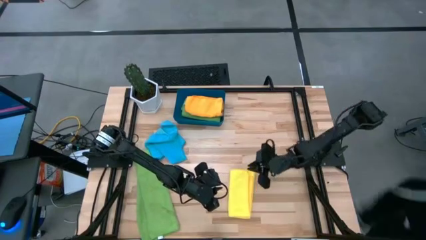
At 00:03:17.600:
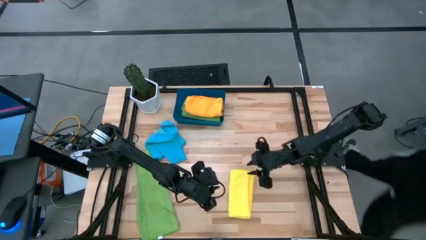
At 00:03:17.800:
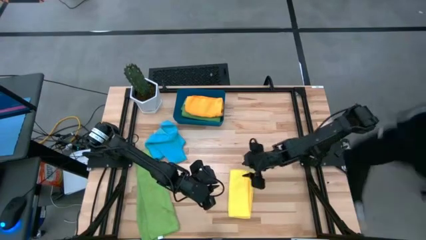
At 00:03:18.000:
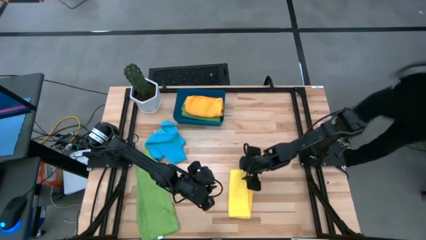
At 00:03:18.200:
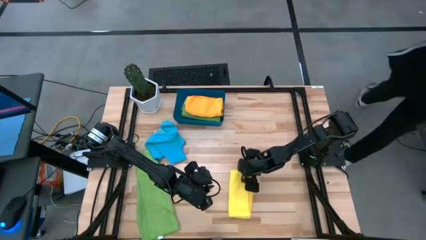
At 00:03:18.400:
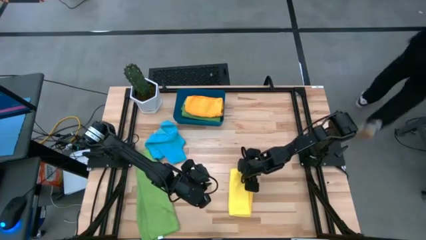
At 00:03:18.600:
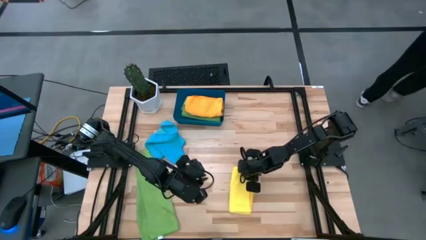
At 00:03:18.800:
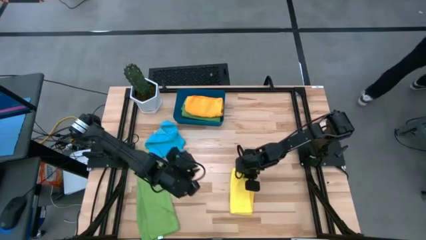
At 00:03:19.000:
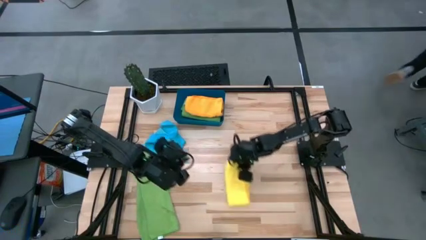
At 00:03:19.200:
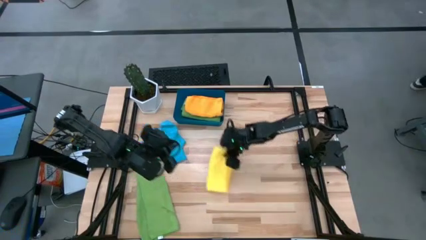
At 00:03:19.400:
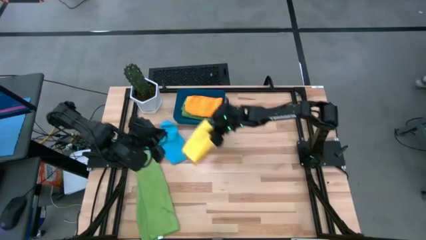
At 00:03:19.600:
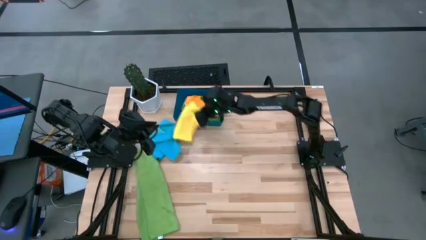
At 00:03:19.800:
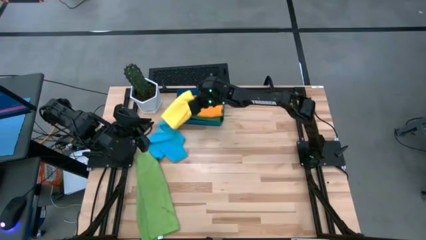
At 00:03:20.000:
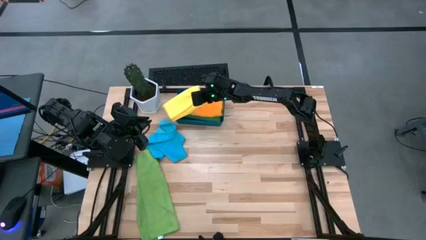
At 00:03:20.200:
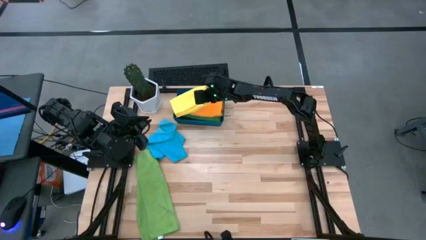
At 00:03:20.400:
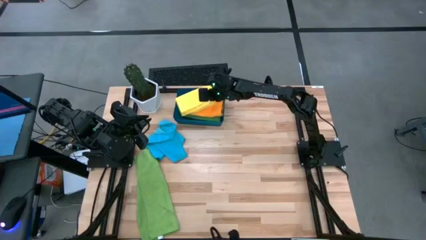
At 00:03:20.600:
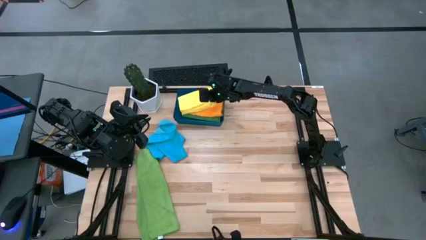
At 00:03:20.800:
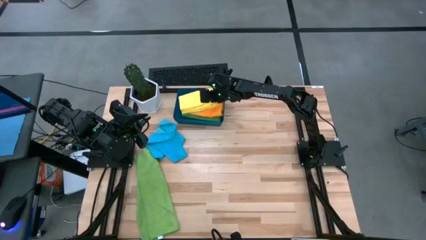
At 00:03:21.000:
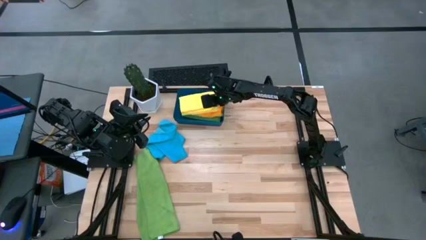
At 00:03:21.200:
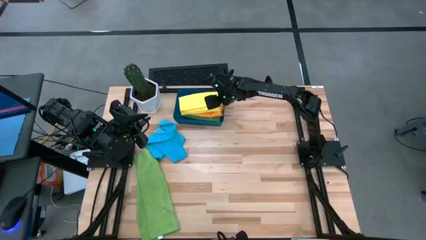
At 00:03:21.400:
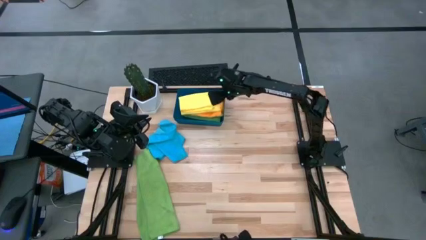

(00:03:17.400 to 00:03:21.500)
Task: Fold microfiber towels
Put the yellow towel into the blue bin

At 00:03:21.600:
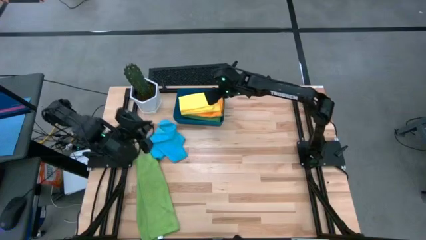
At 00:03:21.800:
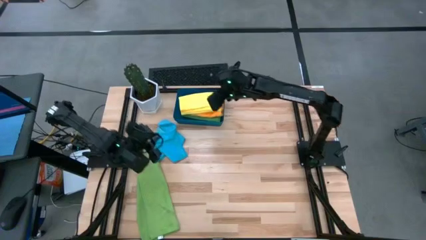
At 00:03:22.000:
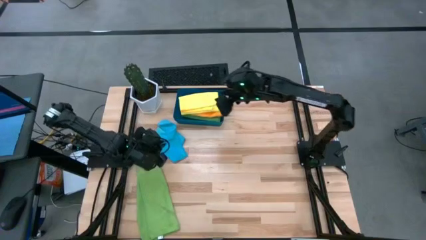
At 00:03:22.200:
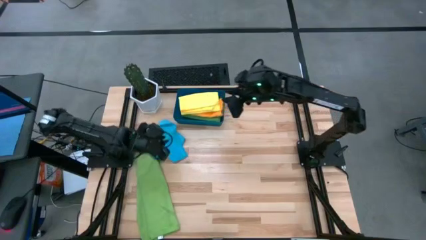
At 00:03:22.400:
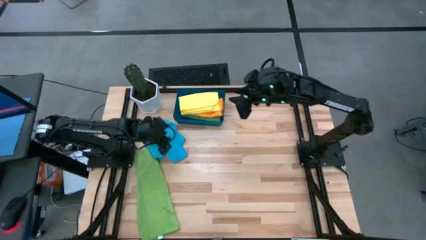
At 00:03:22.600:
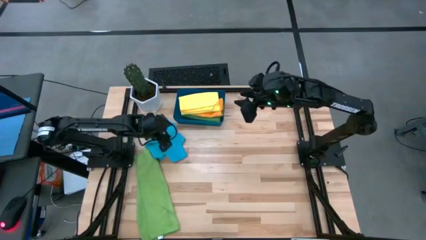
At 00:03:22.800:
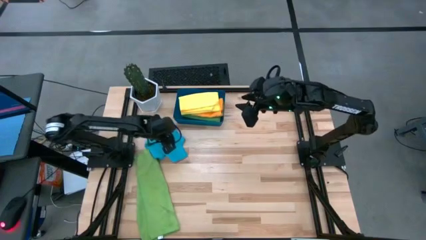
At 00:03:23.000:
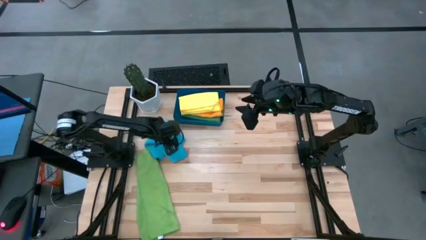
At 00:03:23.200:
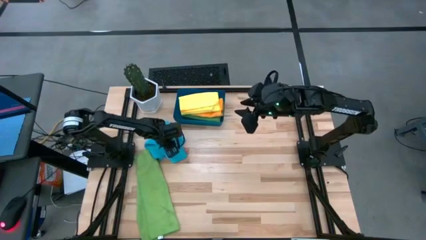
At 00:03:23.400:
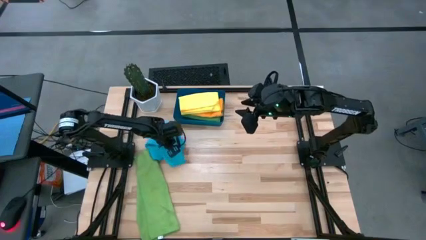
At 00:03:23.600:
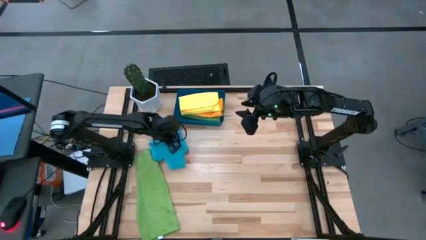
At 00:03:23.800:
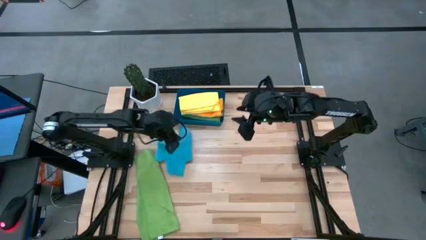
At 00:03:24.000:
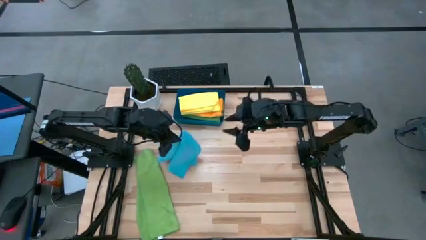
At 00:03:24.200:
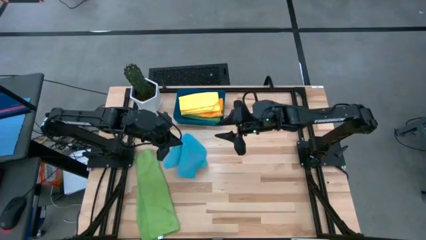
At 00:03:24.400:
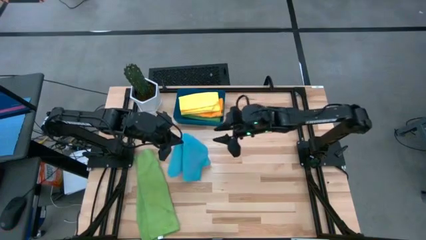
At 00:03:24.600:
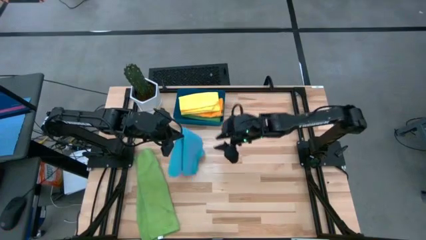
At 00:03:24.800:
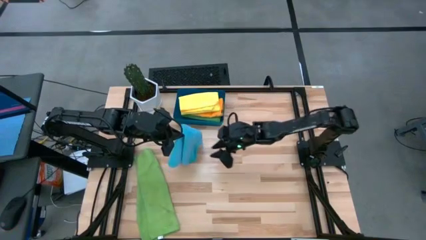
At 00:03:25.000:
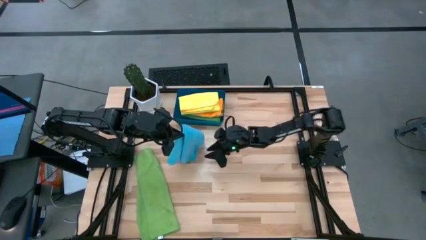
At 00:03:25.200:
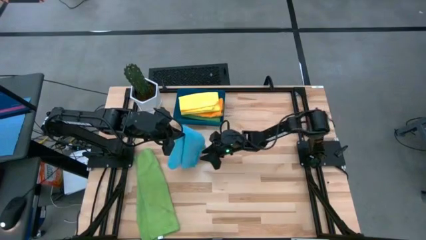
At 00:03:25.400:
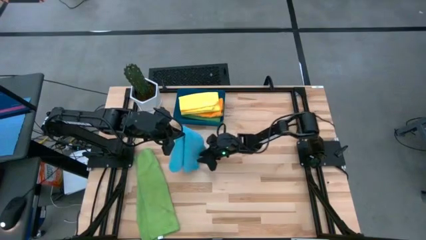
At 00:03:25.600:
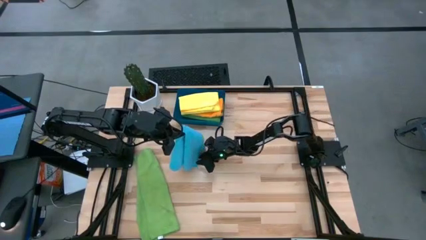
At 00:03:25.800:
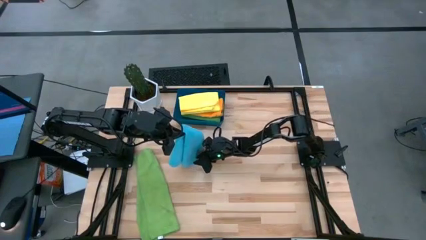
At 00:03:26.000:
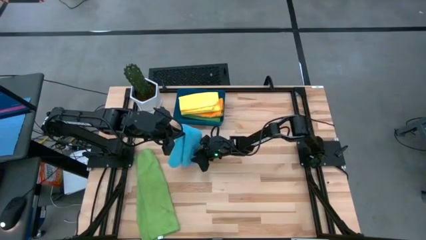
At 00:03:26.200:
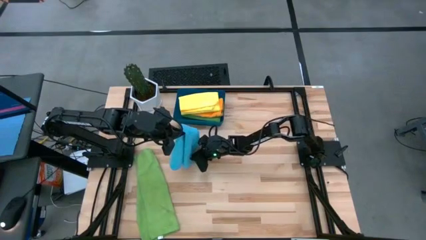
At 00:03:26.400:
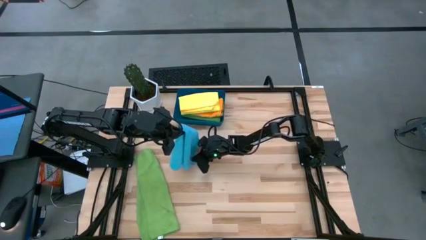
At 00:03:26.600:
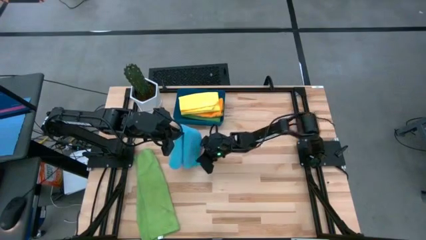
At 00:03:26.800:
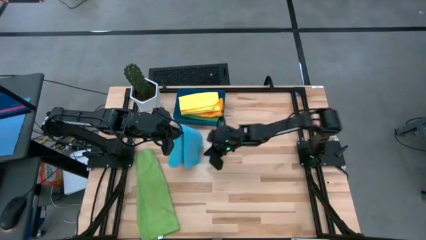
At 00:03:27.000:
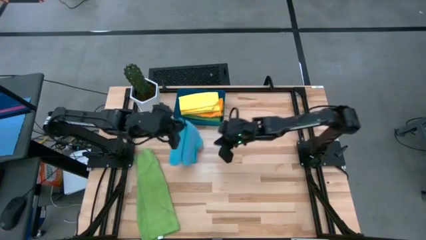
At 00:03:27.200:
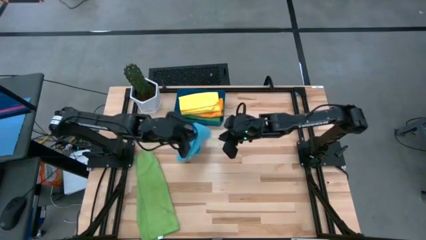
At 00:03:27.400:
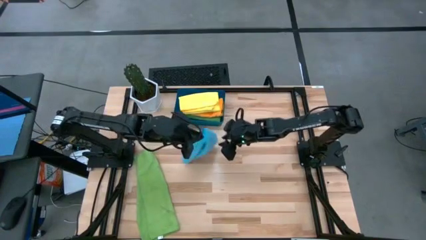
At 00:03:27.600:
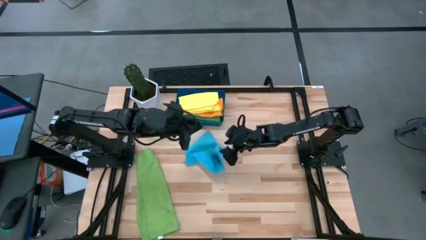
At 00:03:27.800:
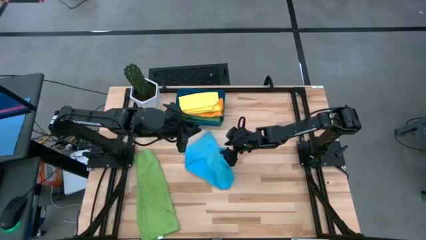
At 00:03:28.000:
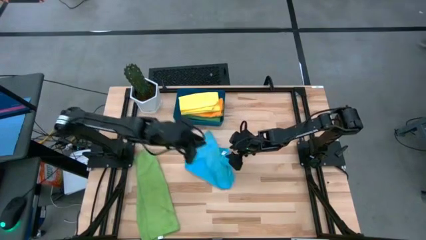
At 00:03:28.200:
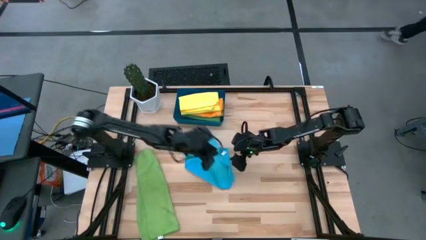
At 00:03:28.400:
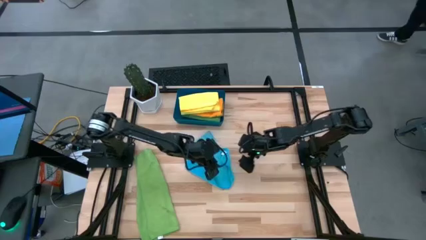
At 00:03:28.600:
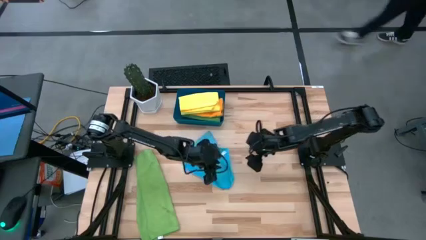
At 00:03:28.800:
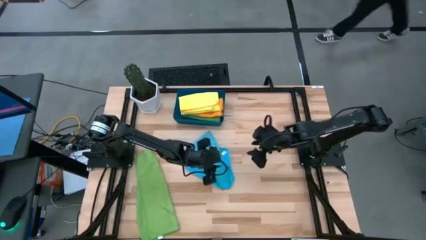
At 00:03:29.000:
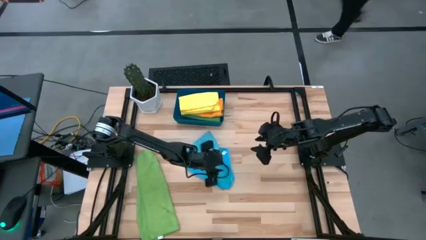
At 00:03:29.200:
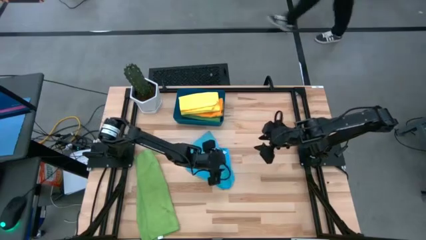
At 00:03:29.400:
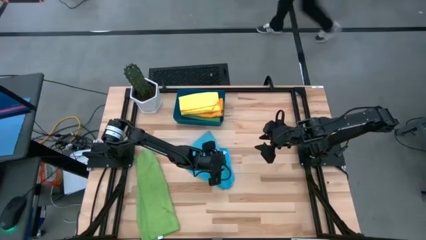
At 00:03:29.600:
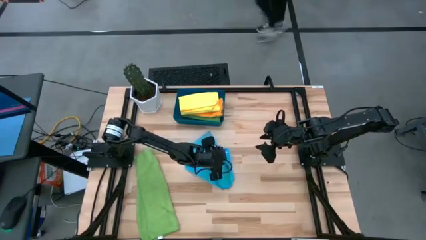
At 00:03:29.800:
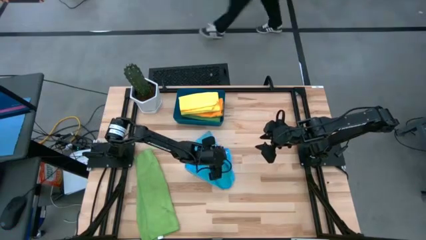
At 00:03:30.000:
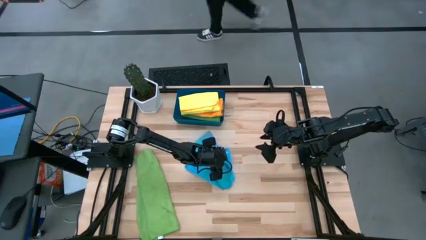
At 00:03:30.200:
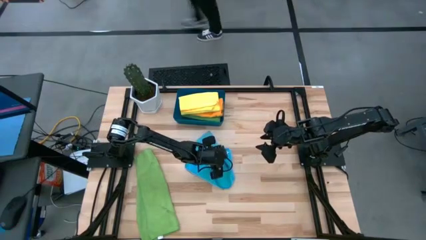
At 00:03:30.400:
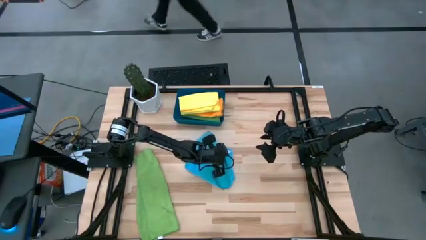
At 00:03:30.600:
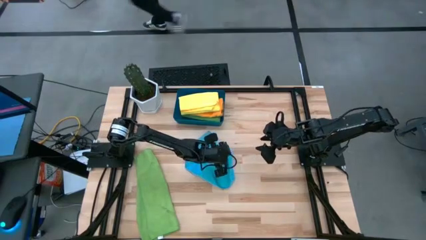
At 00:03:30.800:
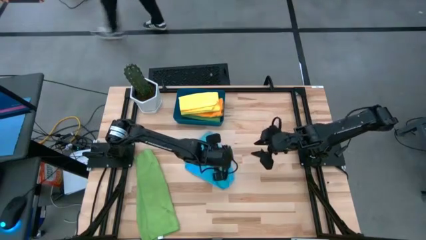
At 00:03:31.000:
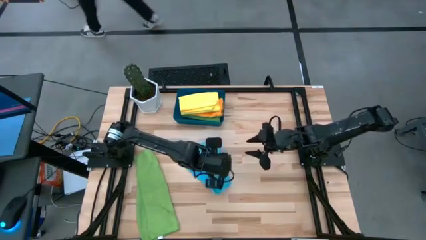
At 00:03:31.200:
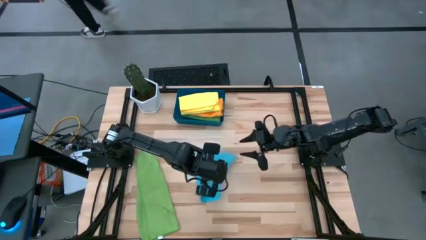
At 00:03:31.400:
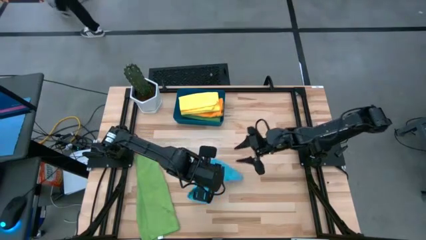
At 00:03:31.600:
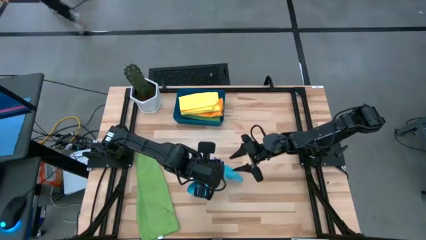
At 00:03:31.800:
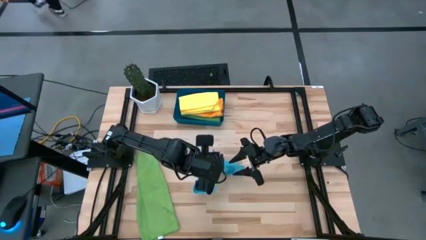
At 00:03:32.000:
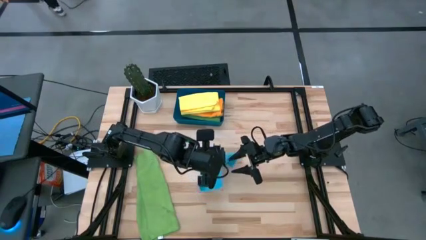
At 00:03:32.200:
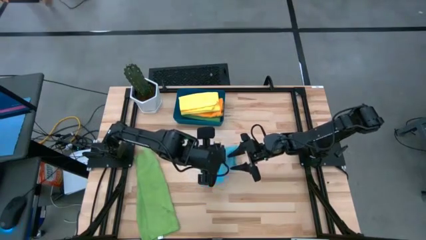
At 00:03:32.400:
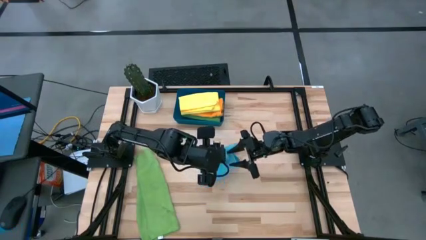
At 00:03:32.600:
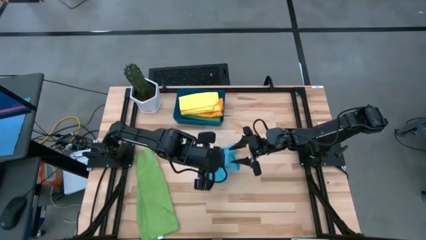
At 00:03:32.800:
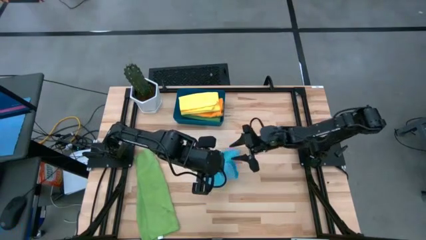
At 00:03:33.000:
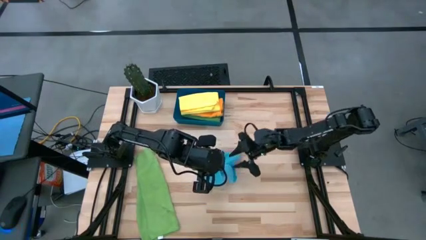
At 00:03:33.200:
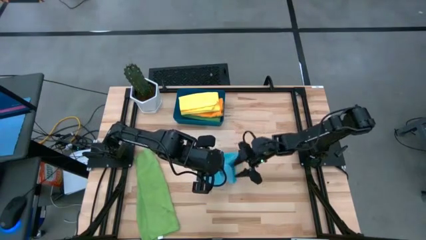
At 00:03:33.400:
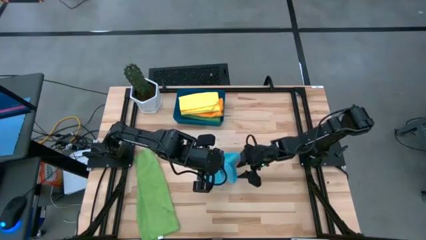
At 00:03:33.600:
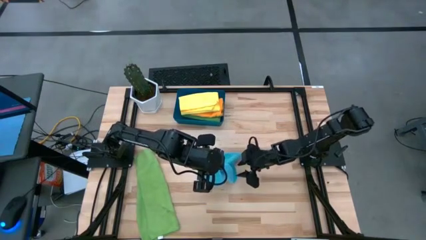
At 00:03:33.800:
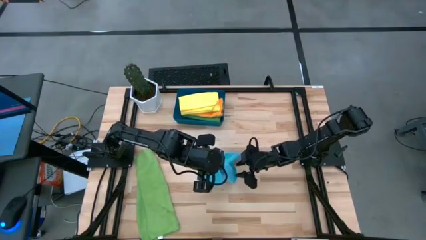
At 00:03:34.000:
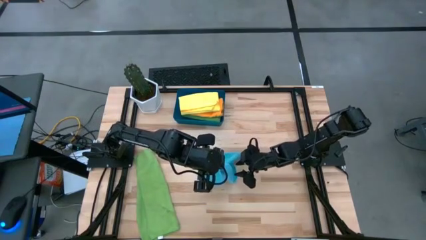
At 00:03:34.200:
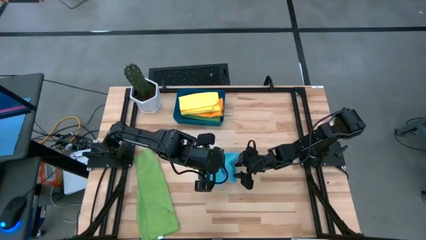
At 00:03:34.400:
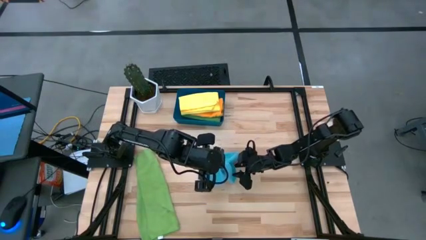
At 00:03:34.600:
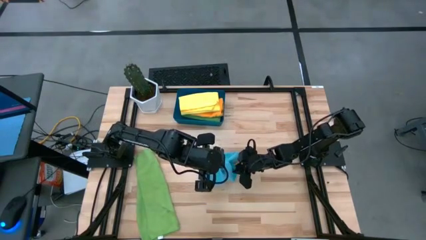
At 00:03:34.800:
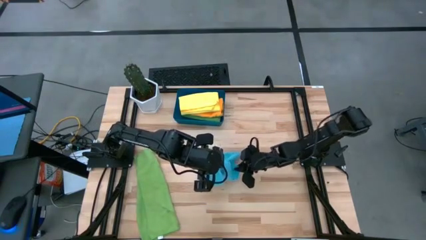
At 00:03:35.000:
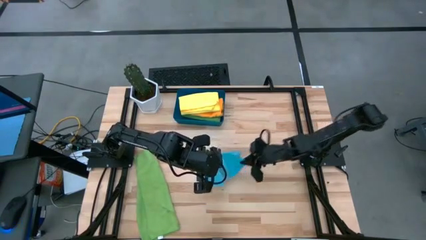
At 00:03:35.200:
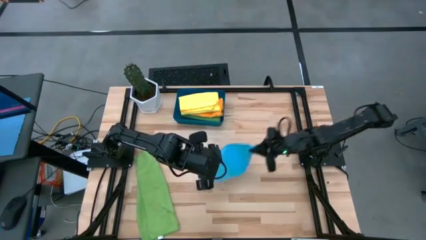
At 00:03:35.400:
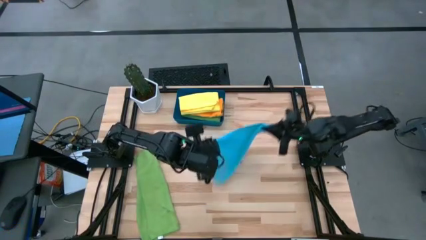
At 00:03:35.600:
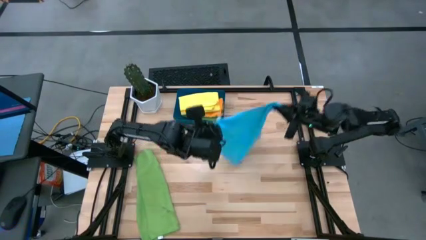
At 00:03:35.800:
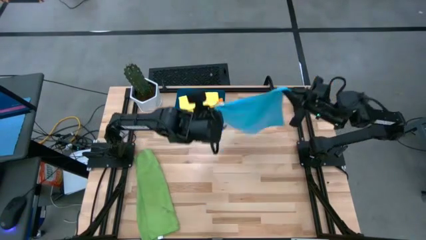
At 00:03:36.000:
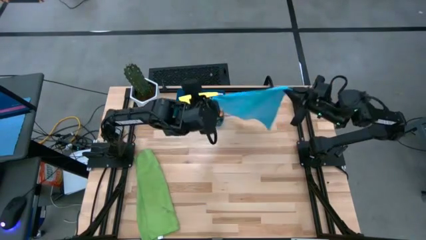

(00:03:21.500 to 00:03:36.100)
Fold the blue towel
